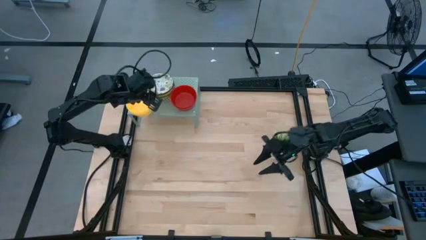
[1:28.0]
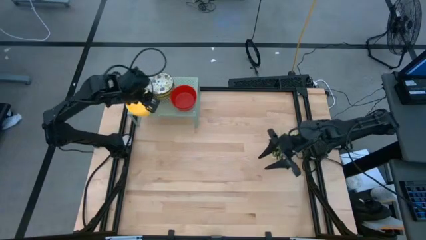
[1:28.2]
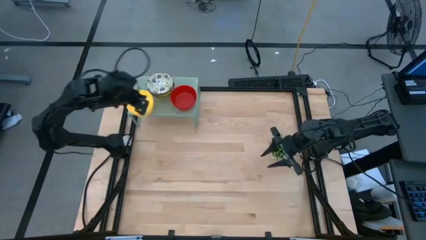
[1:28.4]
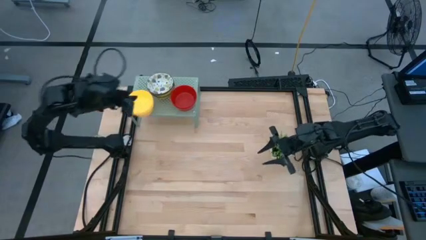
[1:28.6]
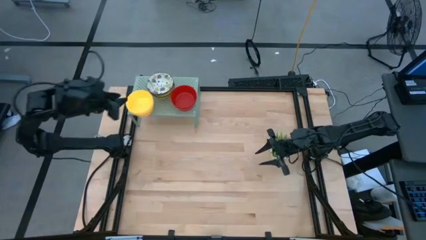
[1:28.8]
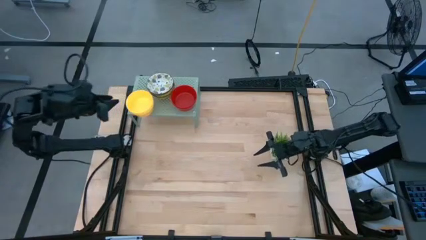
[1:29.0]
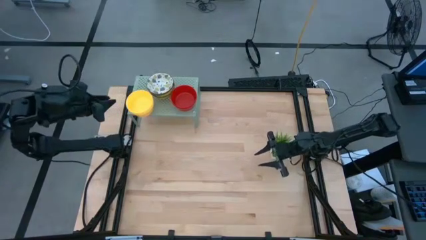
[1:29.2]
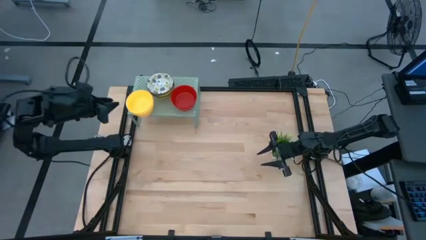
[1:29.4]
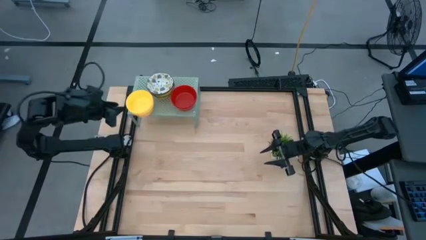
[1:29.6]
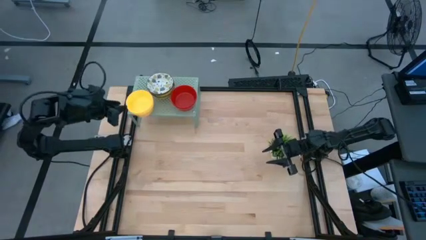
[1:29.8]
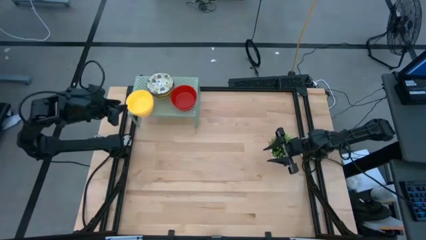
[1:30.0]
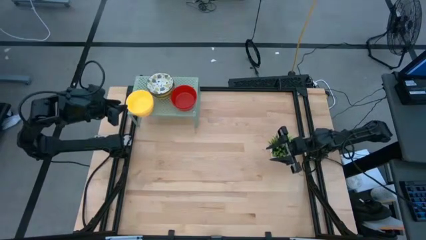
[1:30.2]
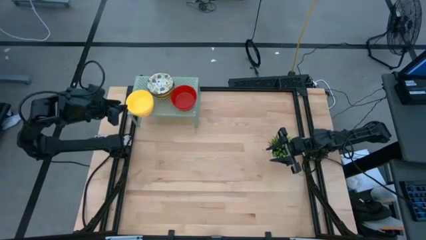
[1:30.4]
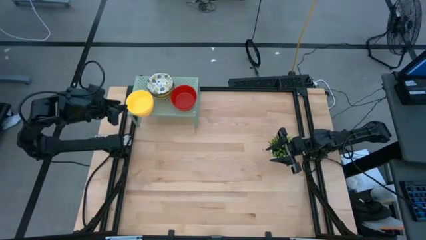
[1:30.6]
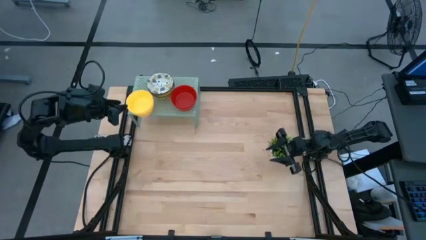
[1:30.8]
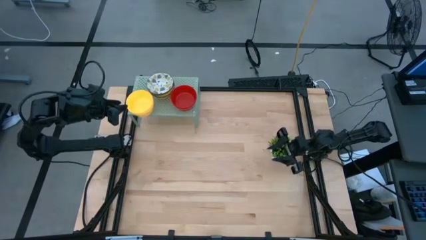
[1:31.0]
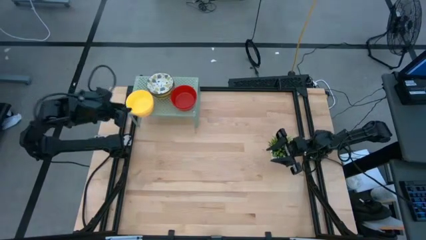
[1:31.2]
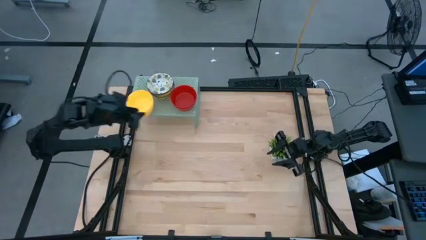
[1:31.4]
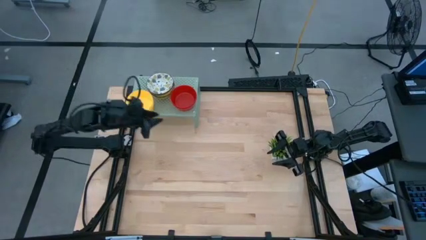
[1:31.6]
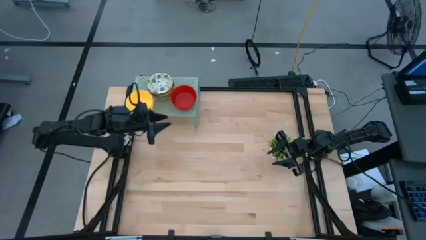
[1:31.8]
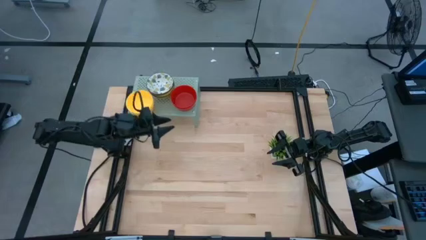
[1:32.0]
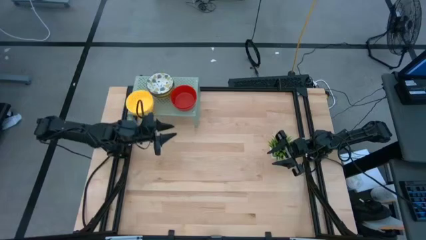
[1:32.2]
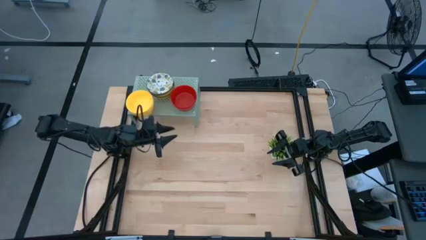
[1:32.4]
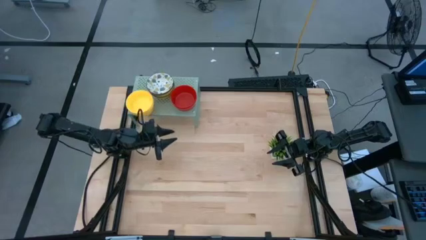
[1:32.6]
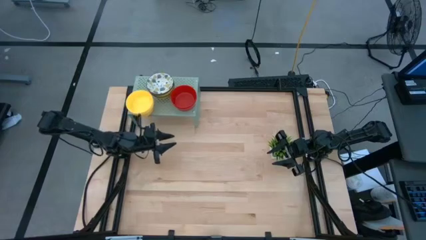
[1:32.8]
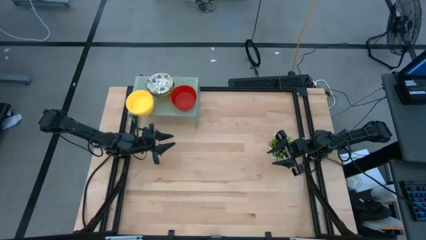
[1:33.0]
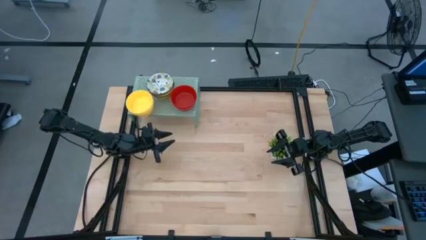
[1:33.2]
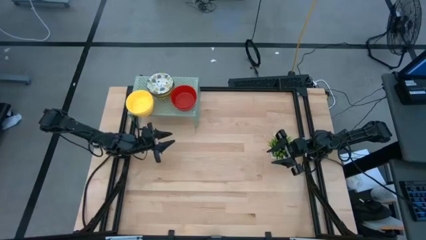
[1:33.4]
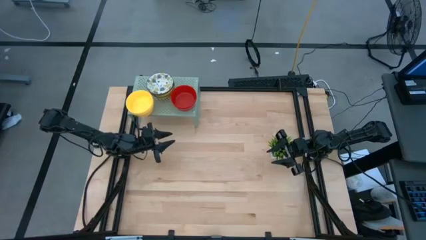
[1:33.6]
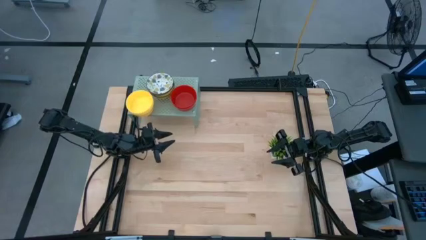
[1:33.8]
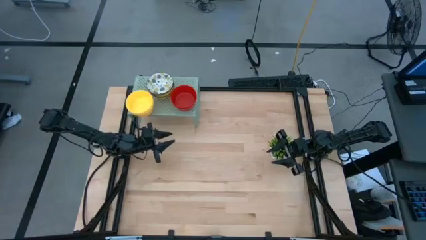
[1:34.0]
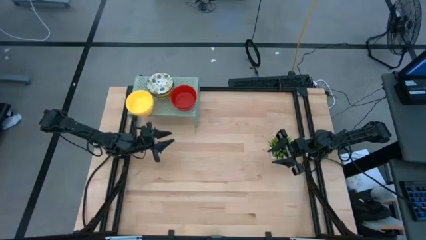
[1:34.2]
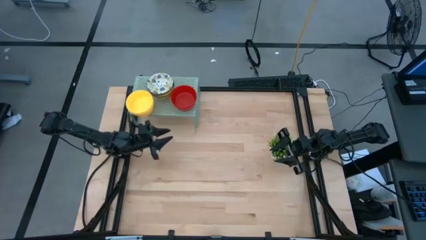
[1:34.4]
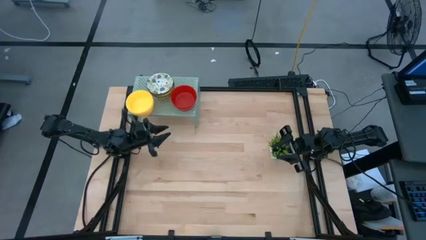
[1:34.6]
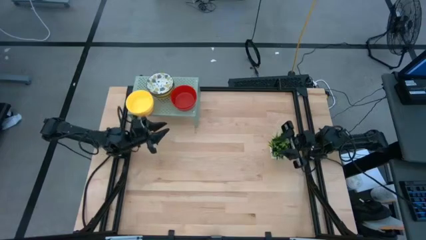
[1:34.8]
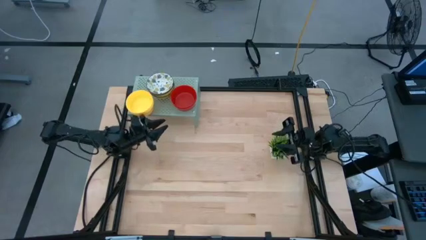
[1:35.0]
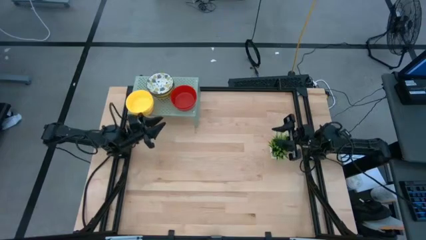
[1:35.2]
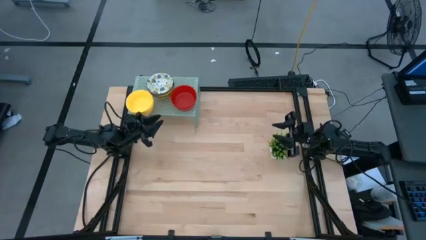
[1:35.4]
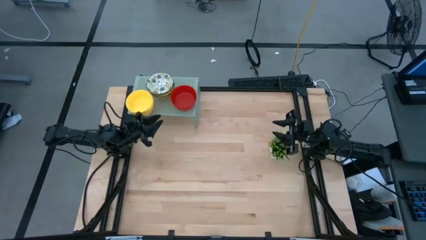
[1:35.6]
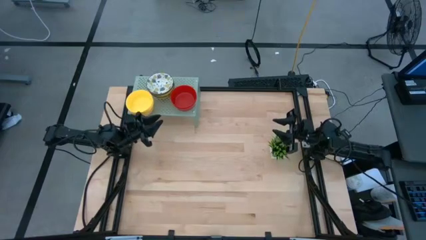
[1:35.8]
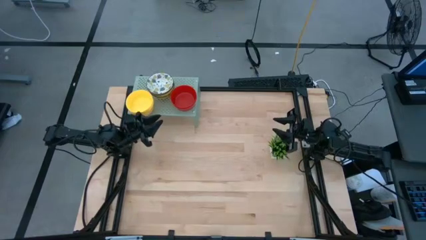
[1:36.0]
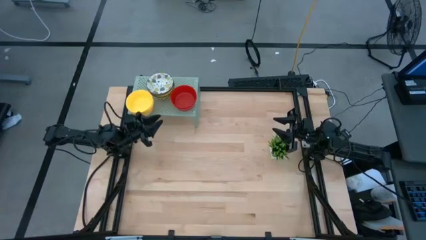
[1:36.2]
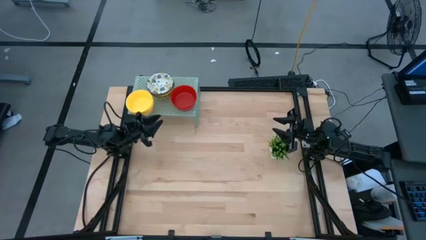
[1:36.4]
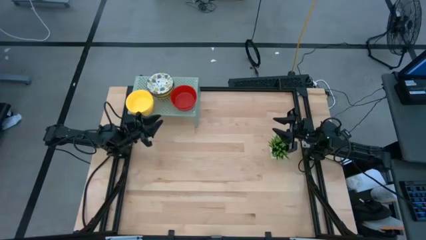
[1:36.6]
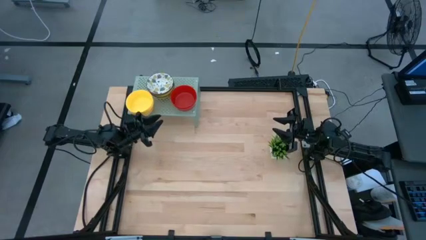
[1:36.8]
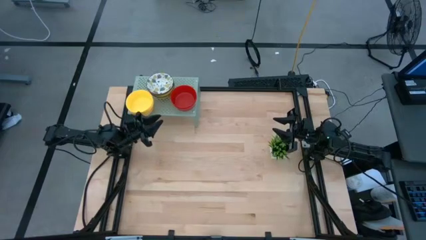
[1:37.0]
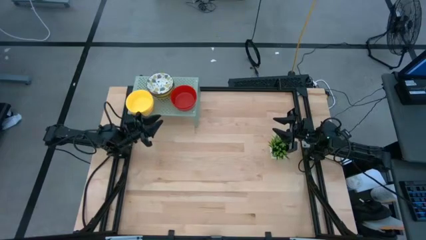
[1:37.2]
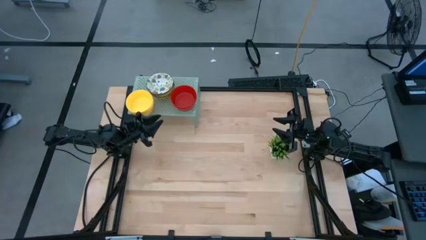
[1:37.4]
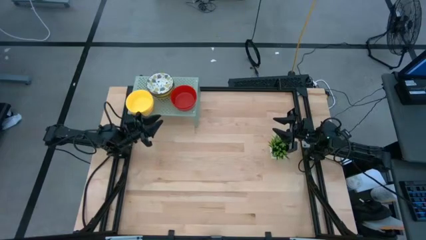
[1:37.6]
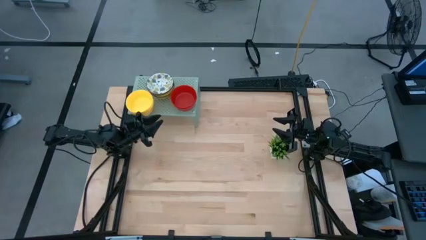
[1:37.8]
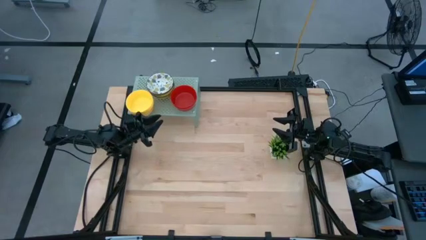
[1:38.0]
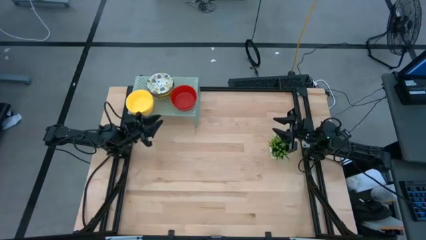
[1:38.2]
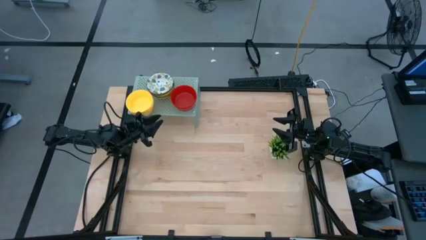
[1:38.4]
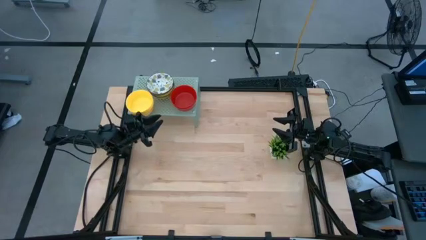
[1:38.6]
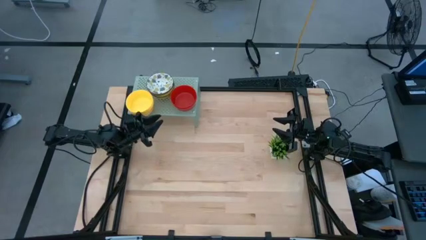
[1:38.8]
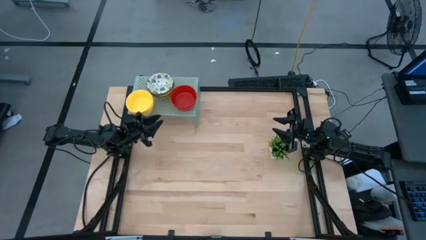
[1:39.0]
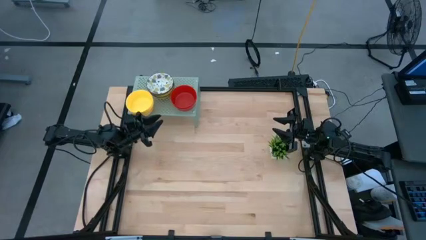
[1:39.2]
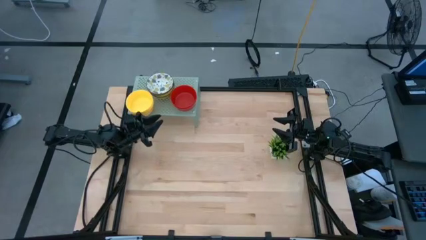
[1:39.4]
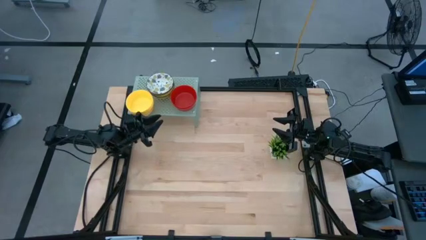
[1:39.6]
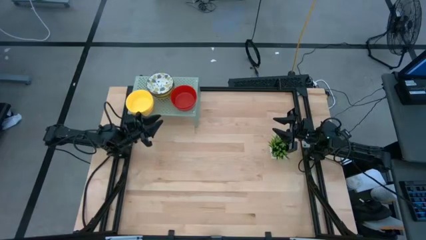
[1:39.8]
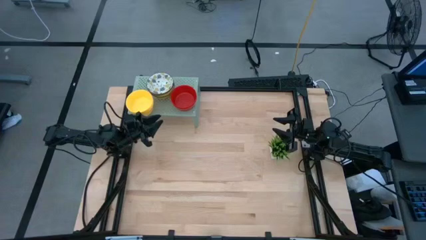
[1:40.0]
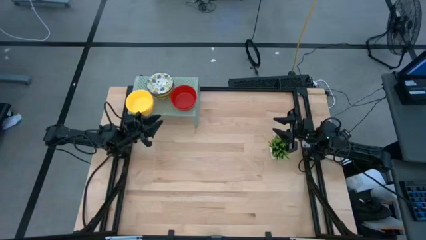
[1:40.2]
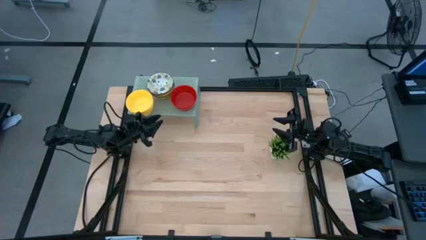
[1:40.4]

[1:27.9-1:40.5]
Task: Pick & Place Mini bowls
Return to Home Position

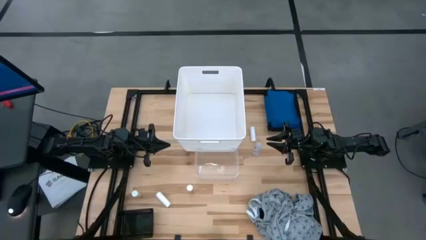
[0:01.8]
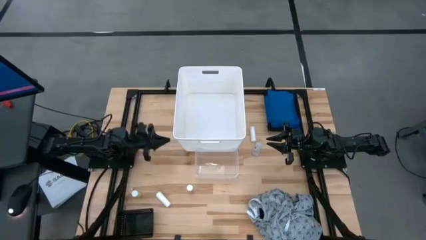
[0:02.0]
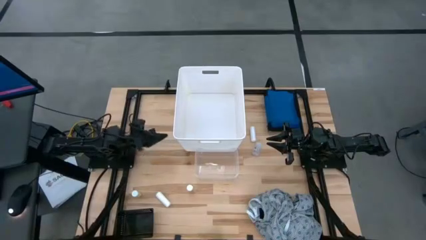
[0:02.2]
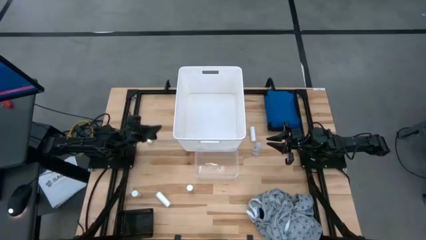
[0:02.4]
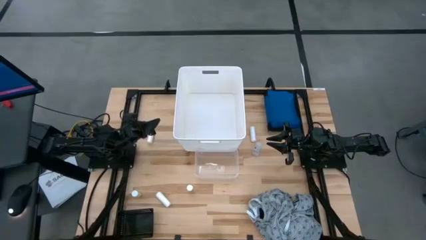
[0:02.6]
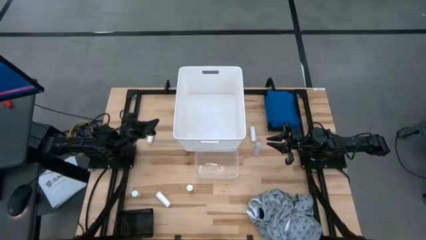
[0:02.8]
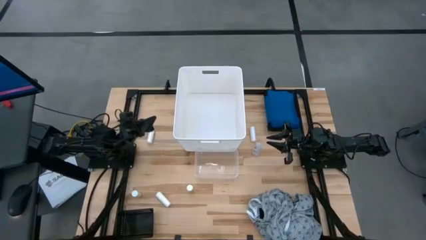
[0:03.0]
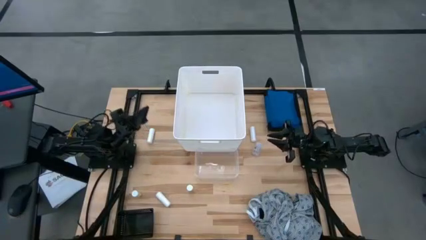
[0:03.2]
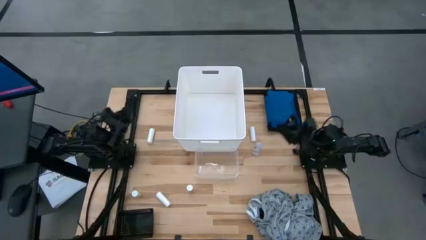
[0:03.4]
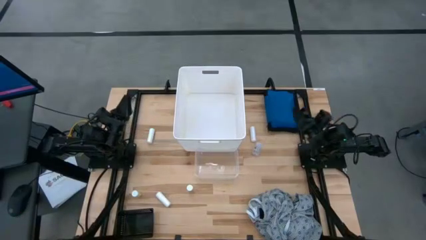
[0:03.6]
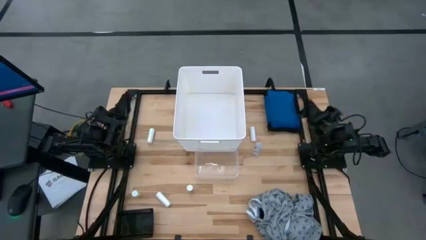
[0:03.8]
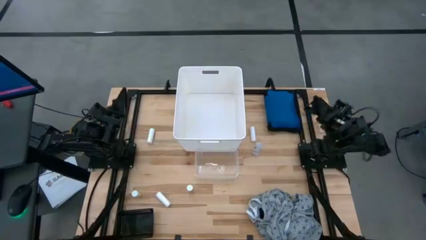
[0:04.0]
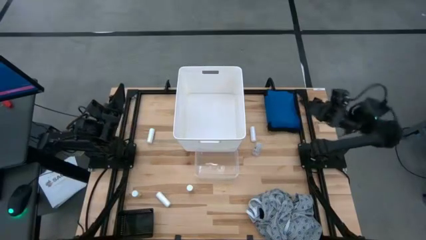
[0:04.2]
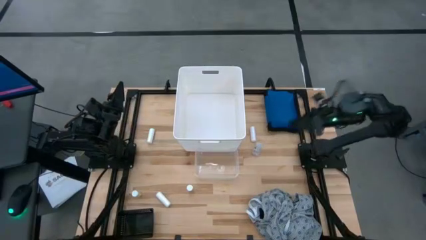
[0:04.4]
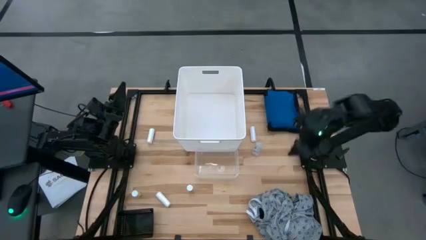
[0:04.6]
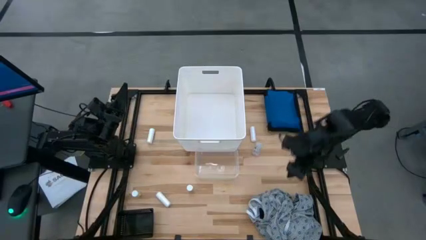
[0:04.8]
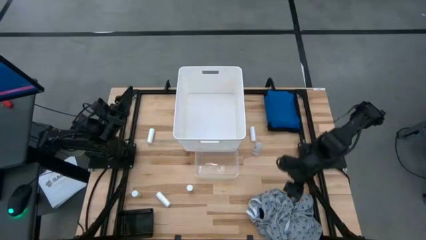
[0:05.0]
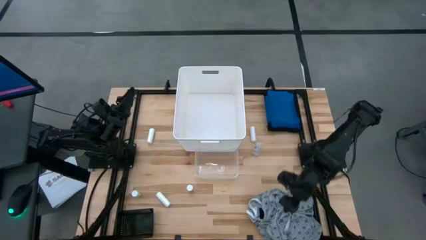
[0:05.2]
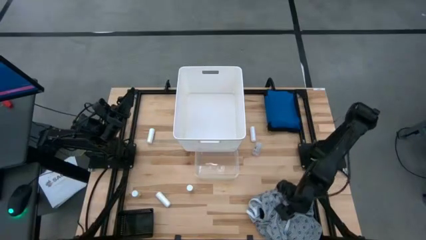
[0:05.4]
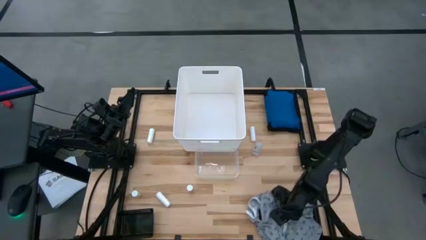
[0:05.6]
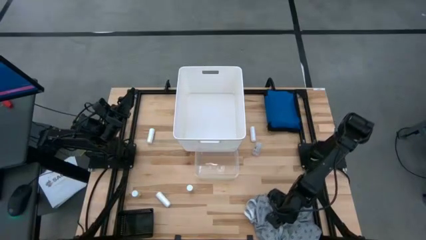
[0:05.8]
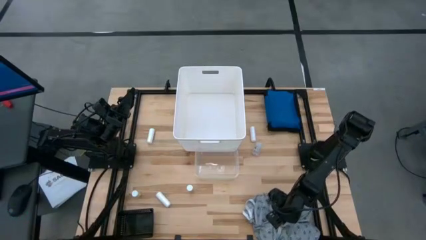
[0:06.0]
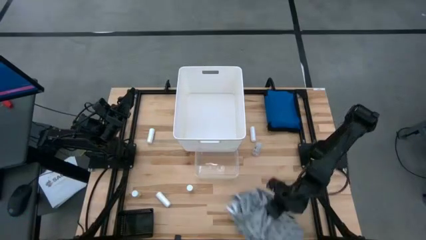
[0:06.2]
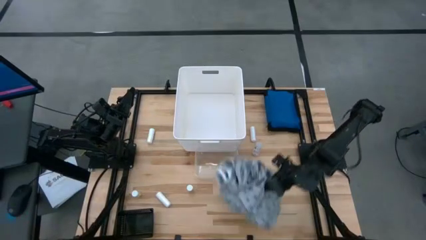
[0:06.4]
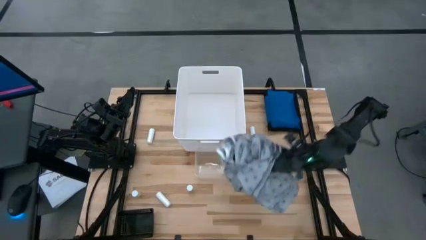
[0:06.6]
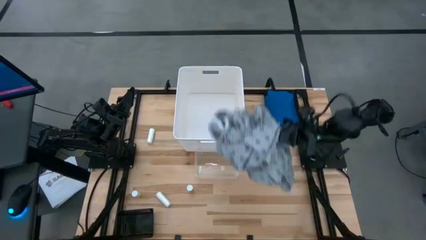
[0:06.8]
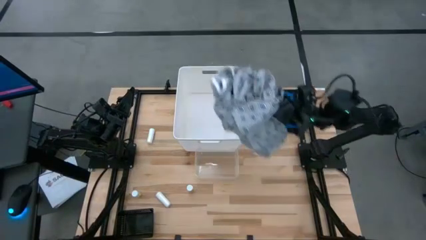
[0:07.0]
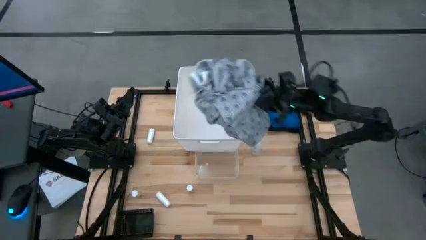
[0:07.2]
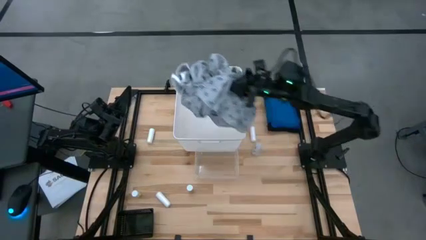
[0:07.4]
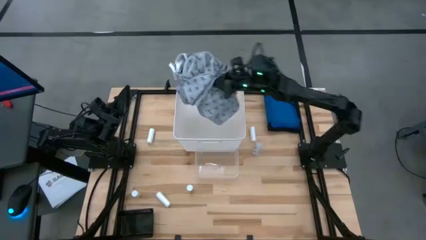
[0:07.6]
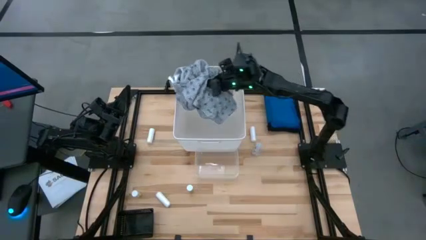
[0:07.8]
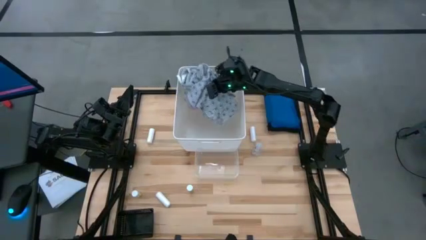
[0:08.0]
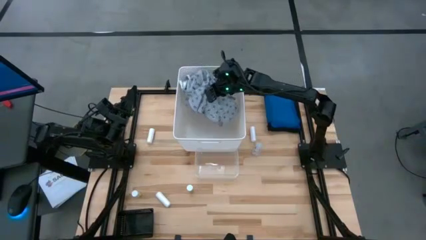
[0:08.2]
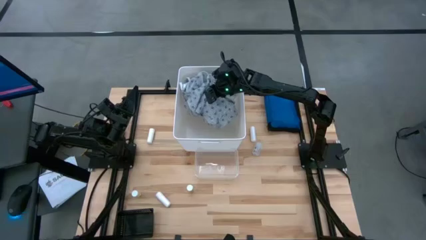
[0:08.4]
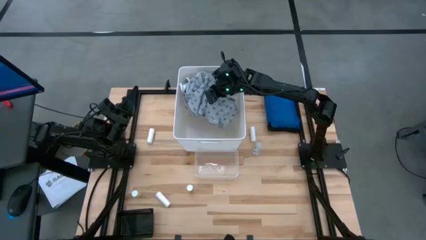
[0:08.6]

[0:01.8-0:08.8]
Task: Pick & Place Medicine items
Put the patient gown into the white bin
